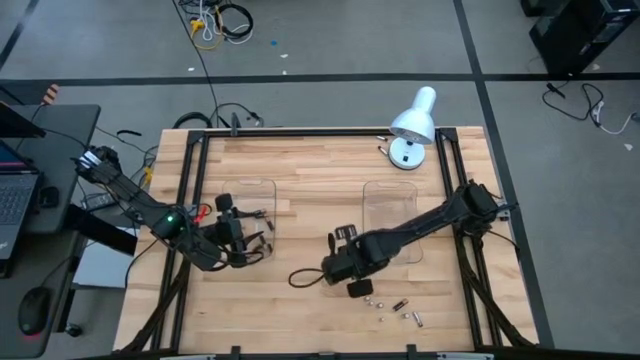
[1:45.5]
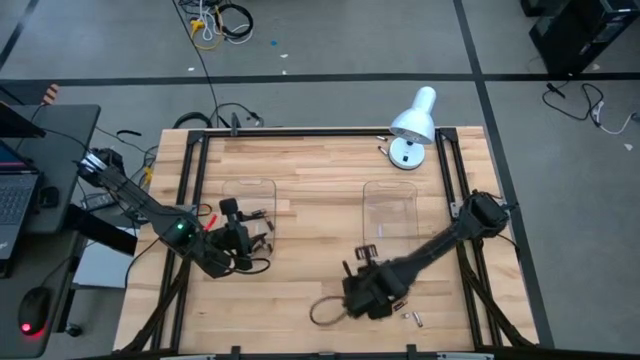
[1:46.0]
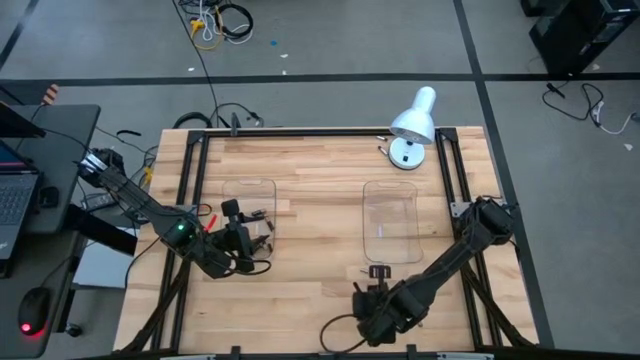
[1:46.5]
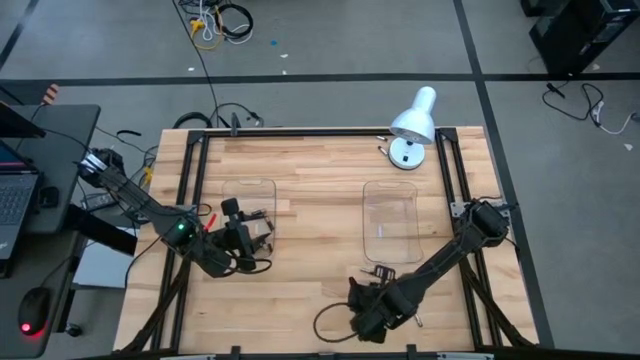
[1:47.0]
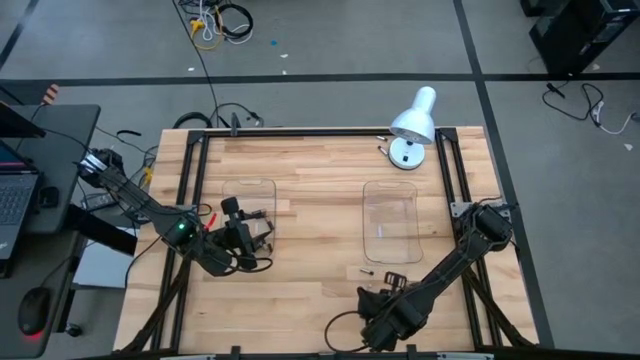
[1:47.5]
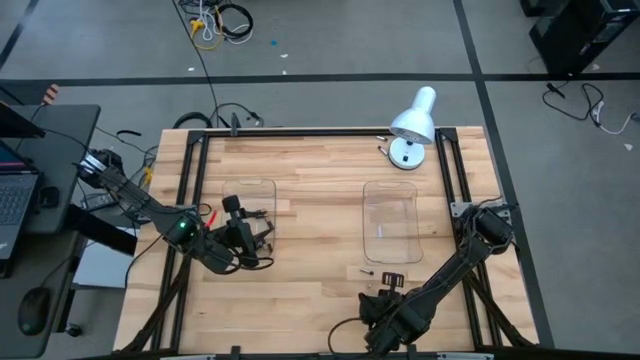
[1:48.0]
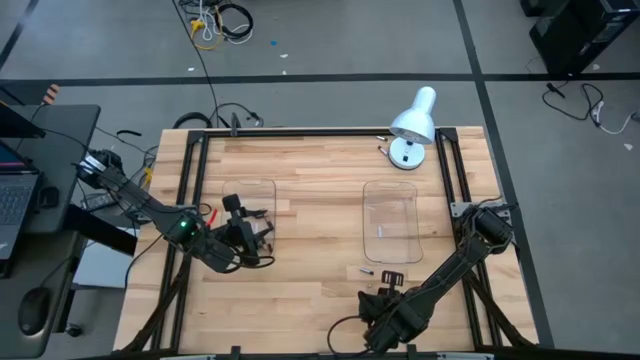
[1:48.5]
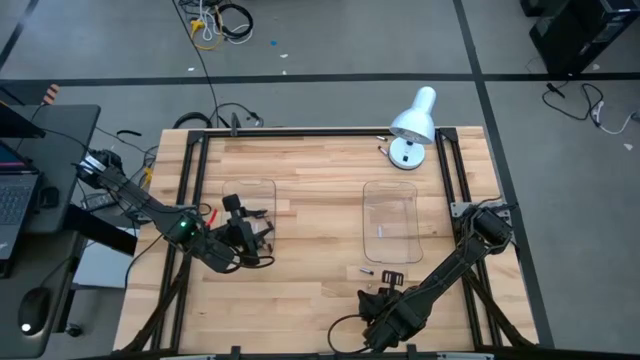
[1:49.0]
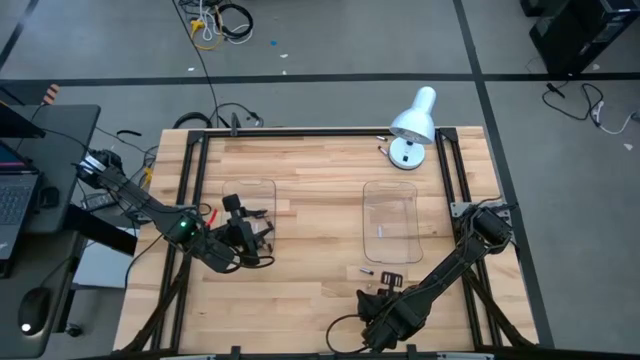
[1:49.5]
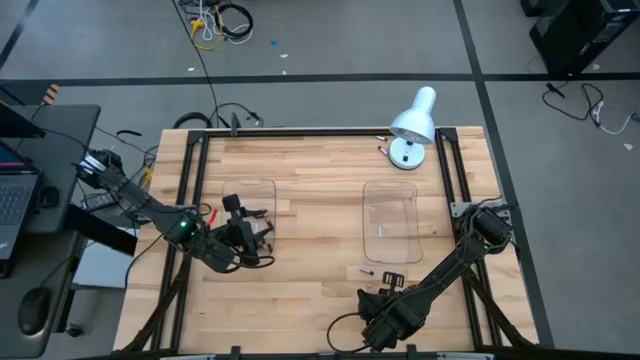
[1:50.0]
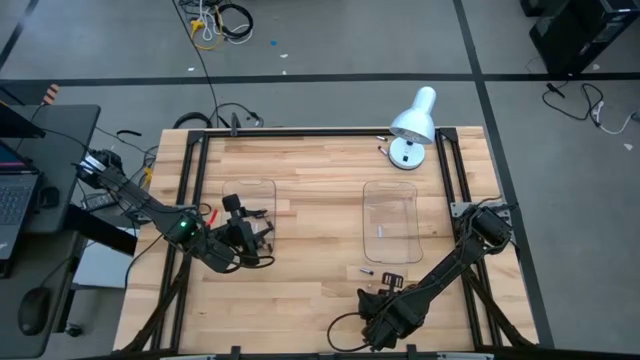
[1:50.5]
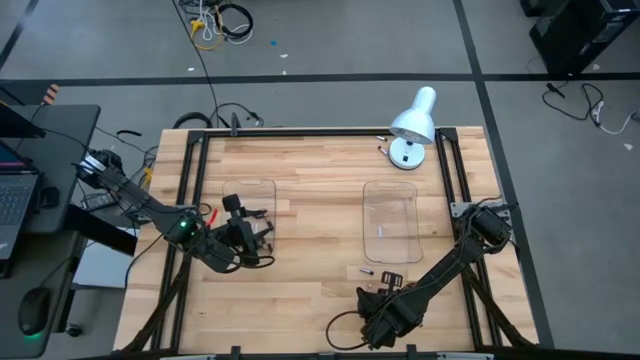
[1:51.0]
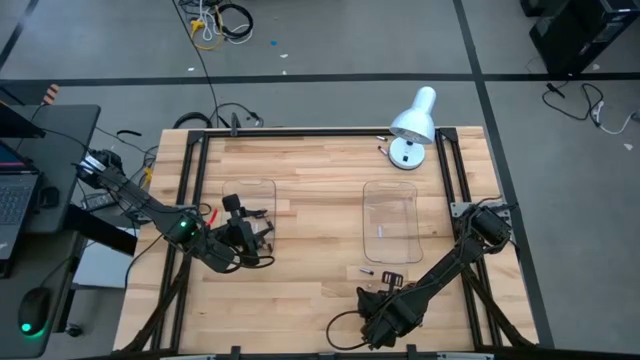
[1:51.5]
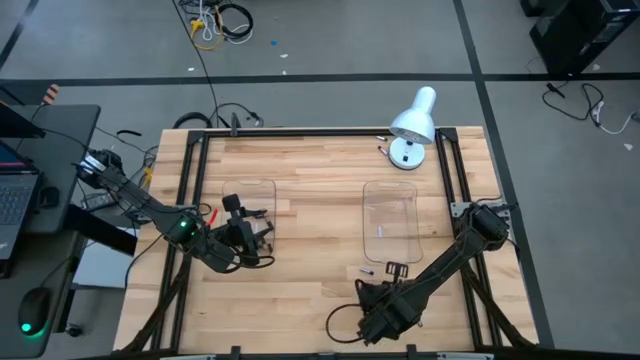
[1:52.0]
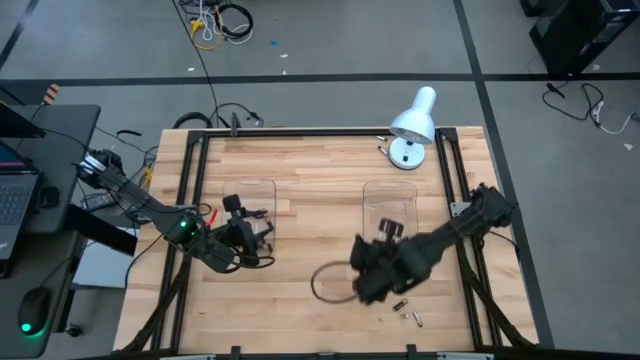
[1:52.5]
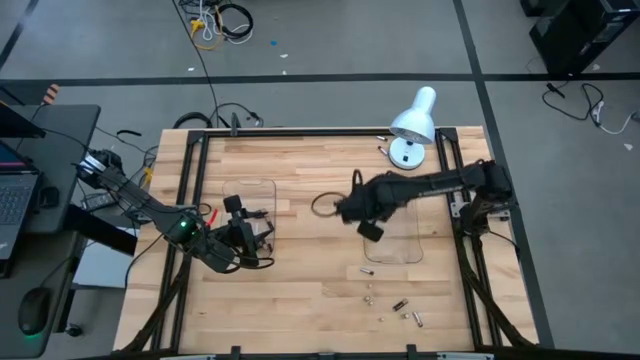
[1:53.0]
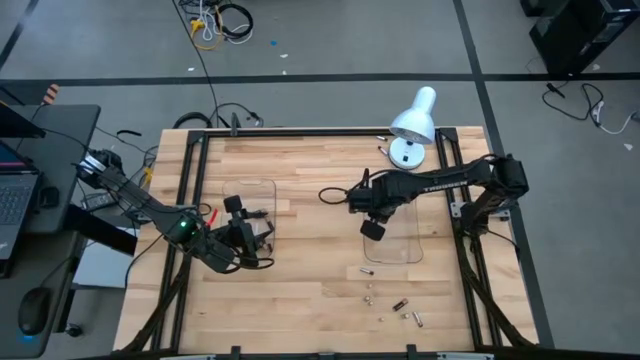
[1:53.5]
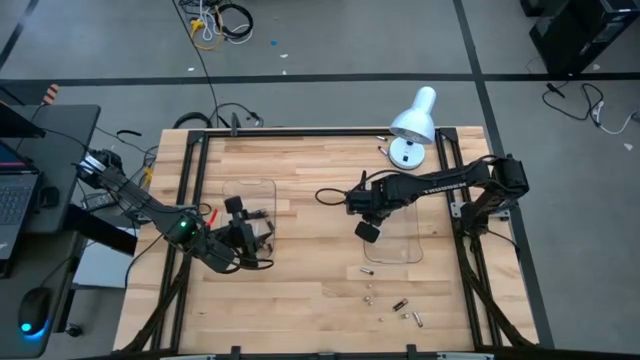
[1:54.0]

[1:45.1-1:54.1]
Task: Sort batteries
Put the silver battery into the right transparent bin

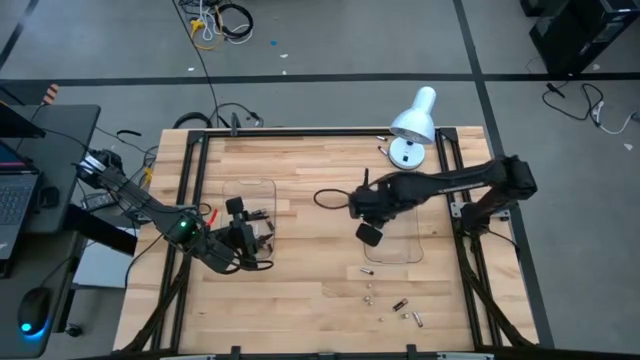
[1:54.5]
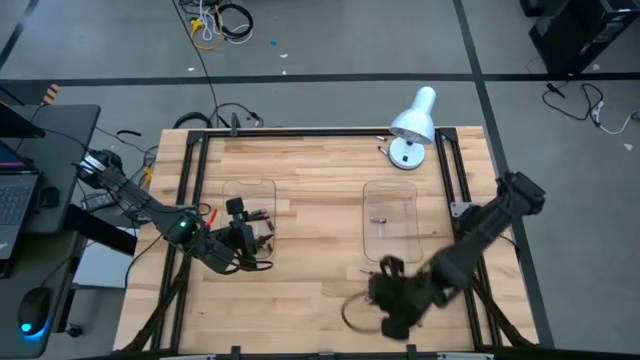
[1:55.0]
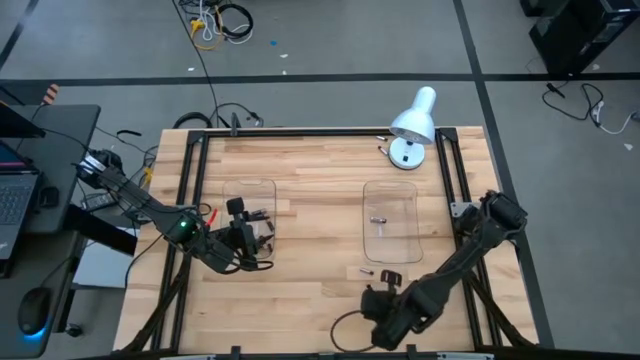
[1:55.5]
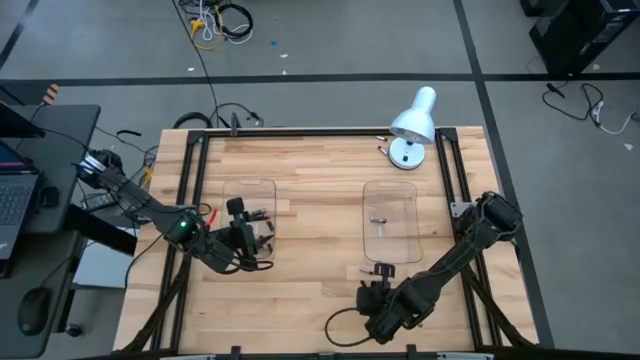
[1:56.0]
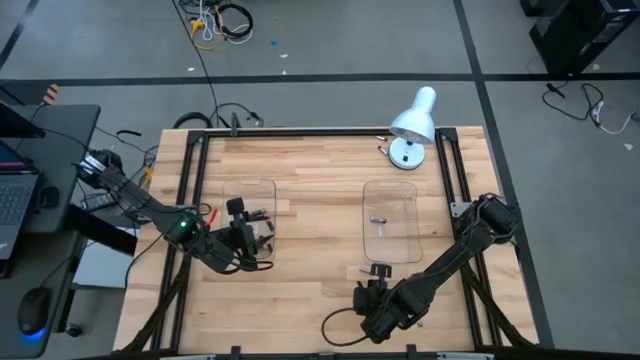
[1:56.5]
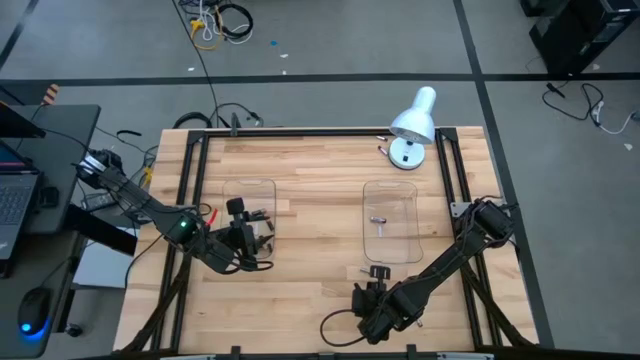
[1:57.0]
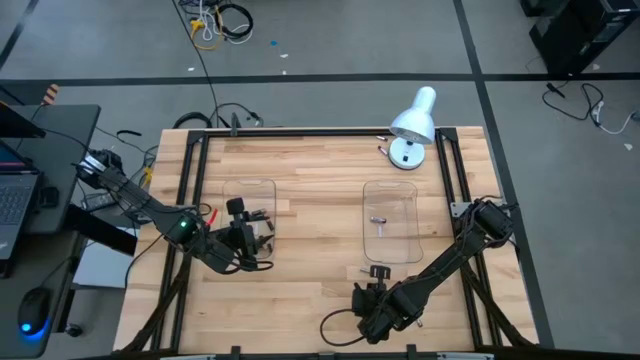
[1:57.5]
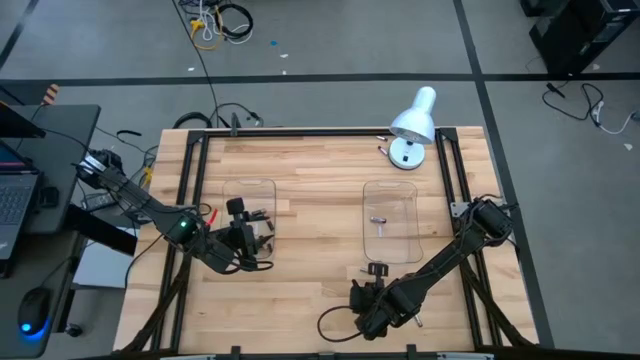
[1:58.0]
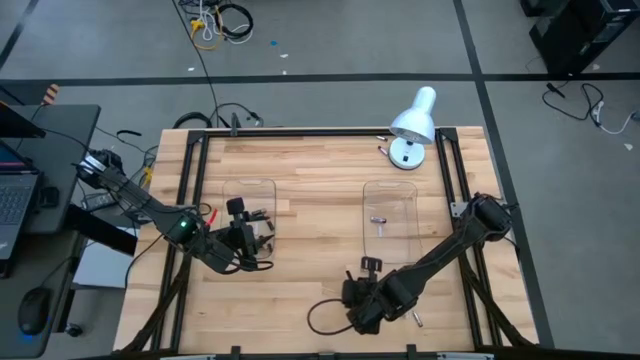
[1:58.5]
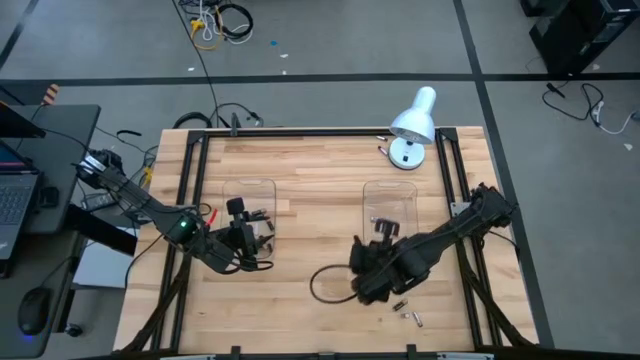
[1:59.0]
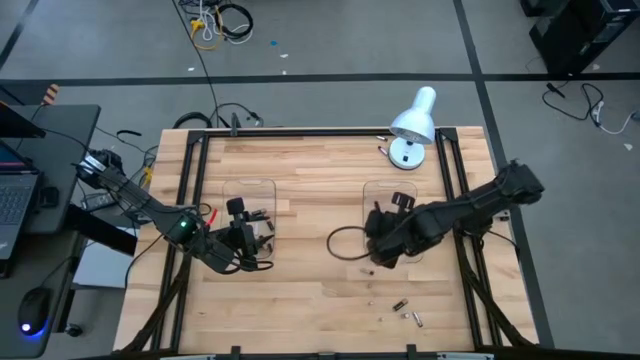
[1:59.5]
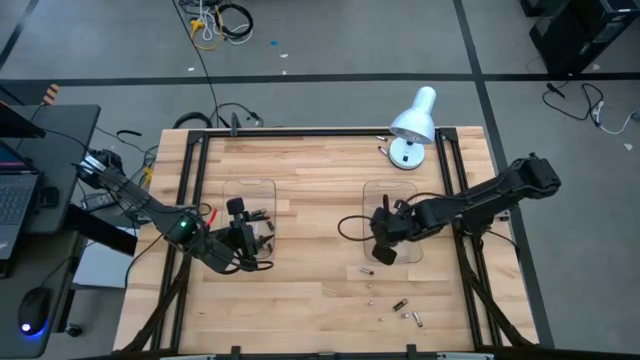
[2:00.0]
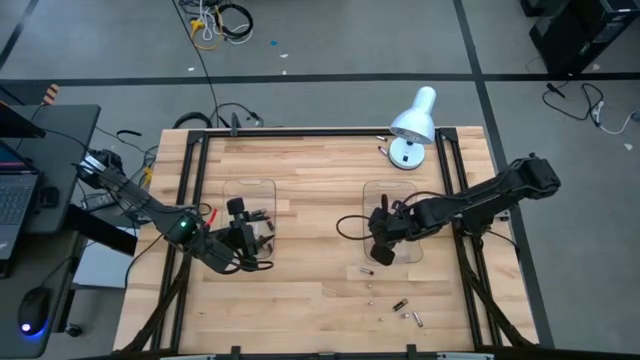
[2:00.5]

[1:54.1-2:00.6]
Put the silver battery into the right transparent bin

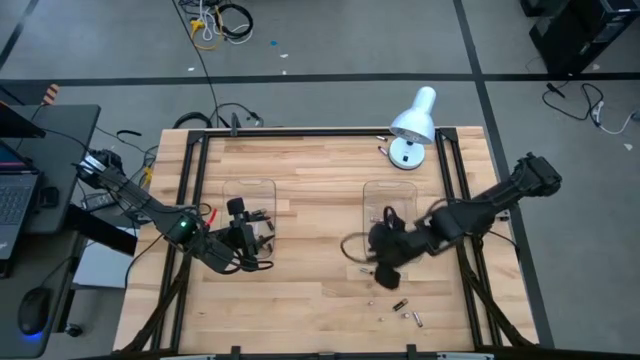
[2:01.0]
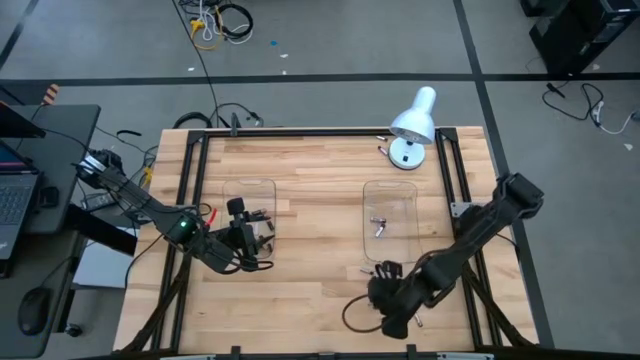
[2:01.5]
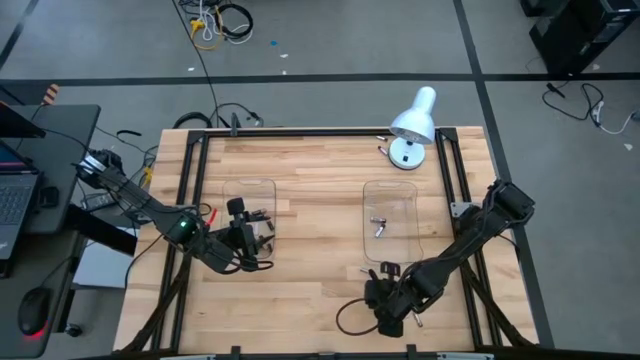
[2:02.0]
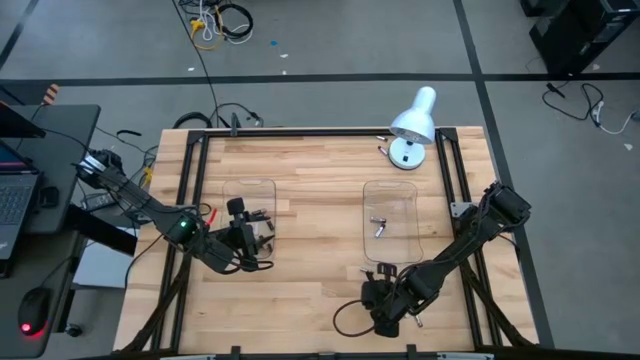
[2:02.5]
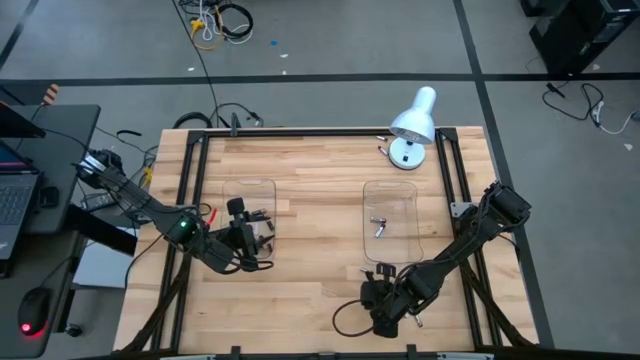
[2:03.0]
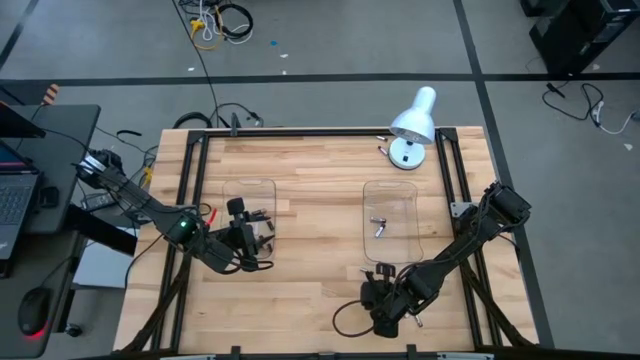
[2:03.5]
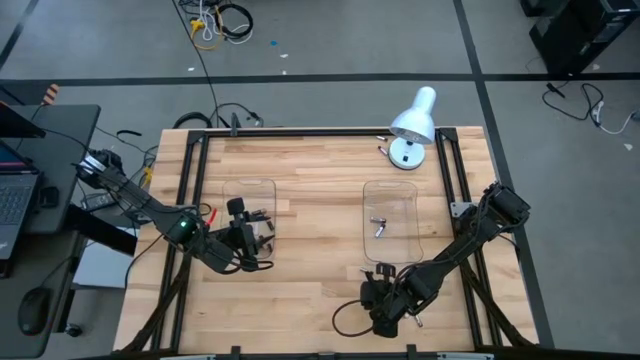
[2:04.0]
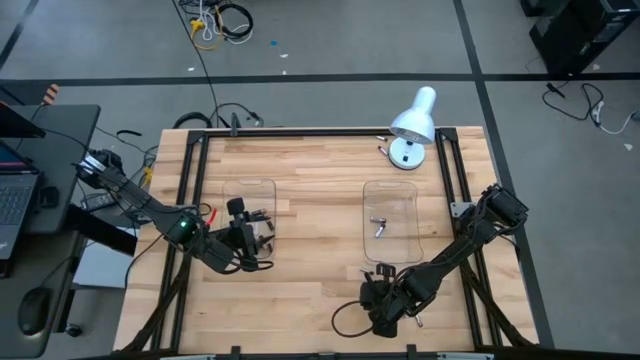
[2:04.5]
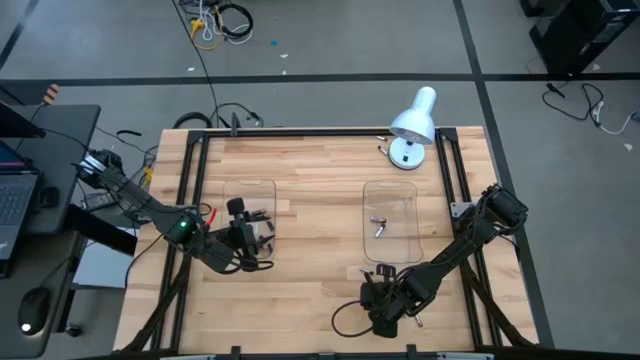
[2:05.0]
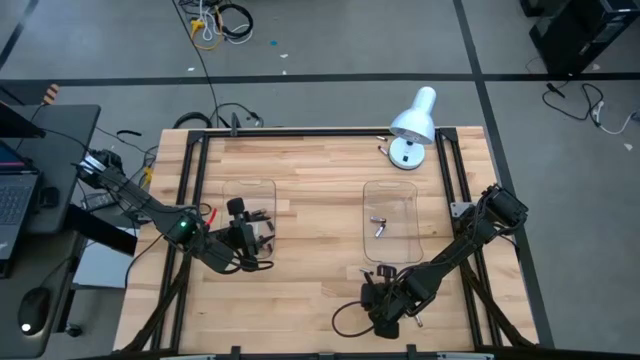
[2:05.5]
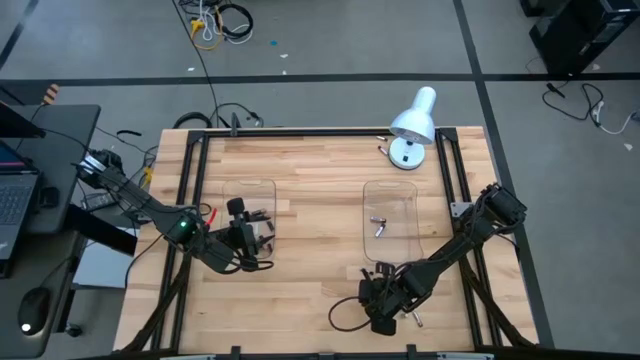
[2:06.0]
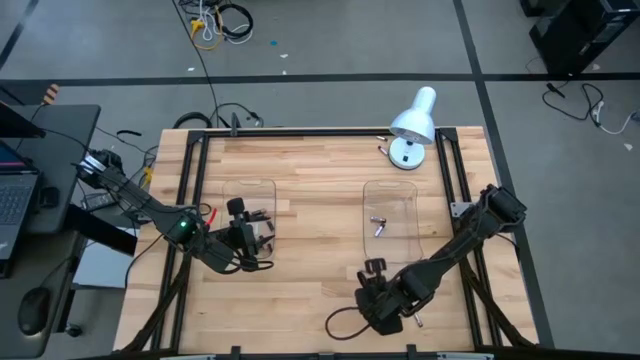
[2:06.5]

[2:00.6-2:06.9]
Put the silver battery into the right transparent bin
